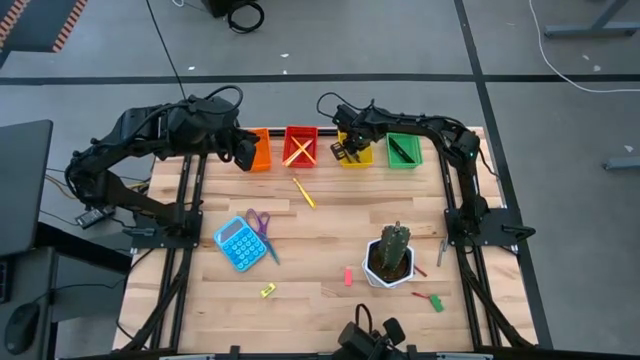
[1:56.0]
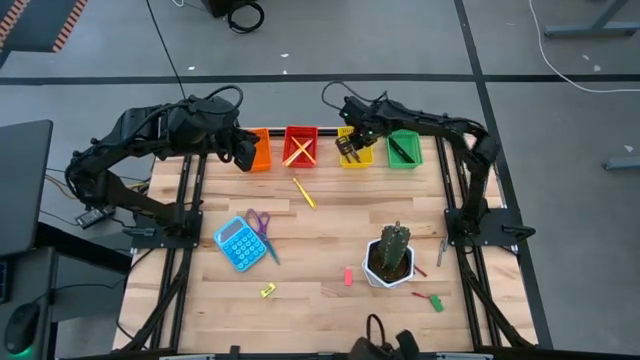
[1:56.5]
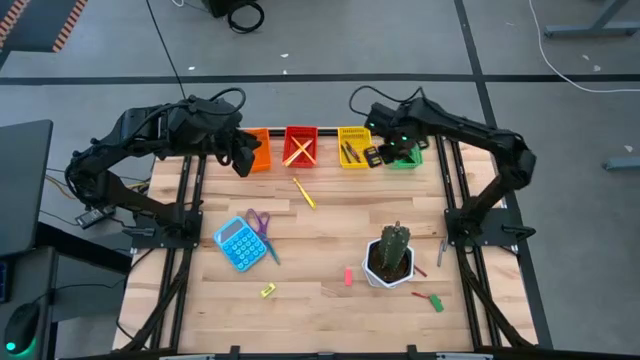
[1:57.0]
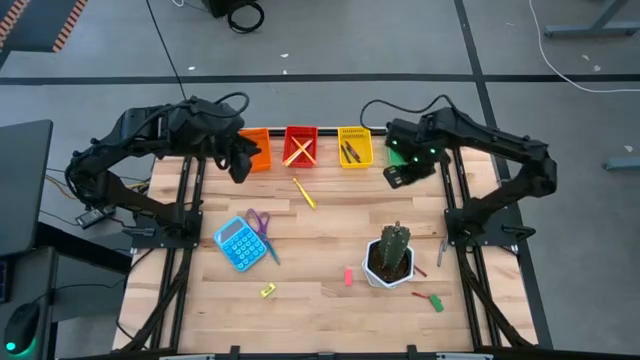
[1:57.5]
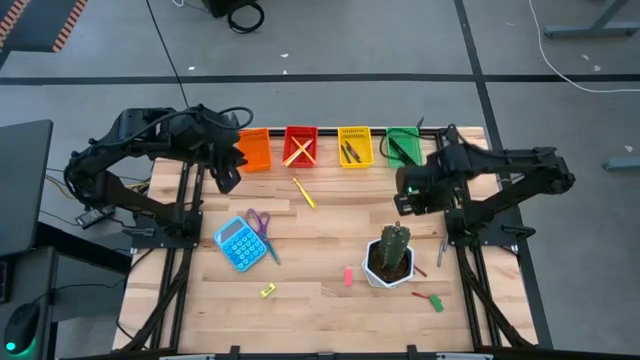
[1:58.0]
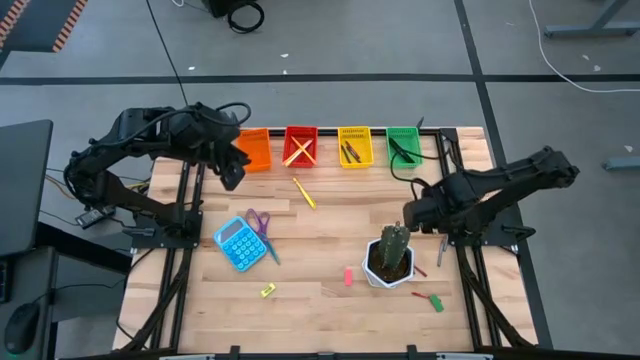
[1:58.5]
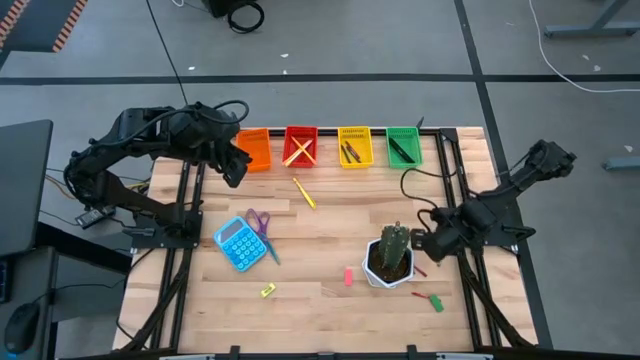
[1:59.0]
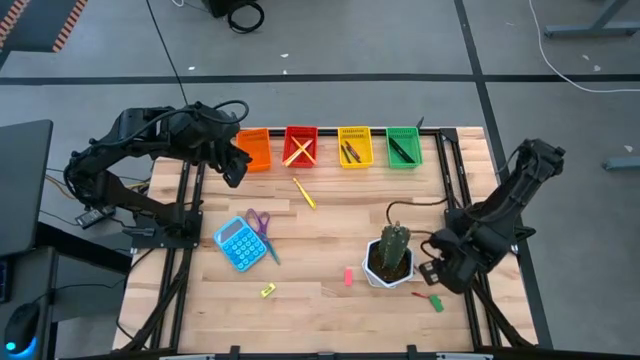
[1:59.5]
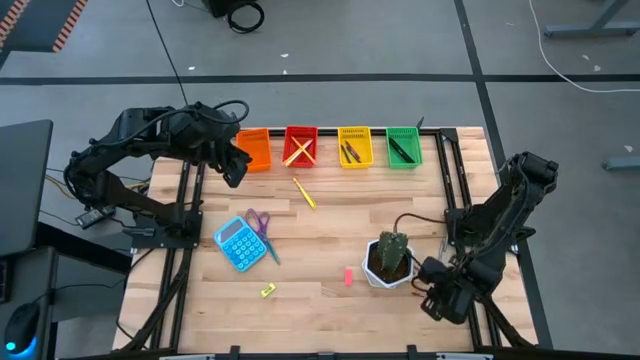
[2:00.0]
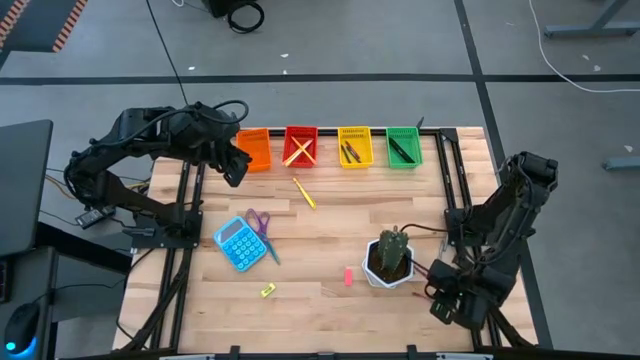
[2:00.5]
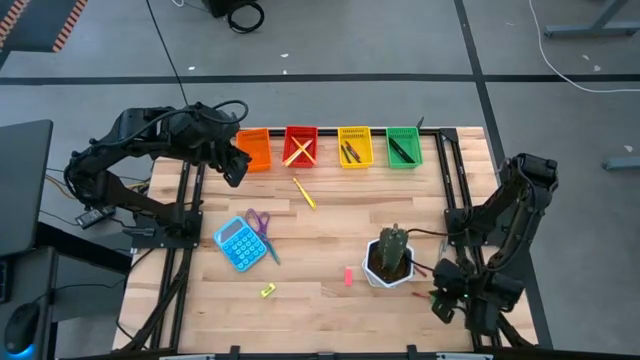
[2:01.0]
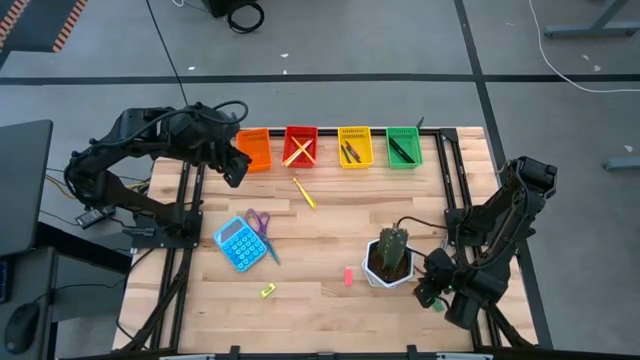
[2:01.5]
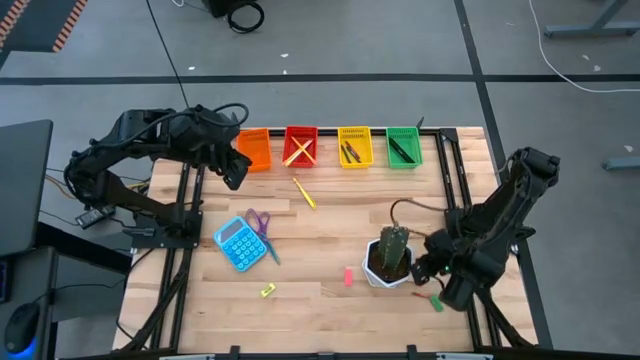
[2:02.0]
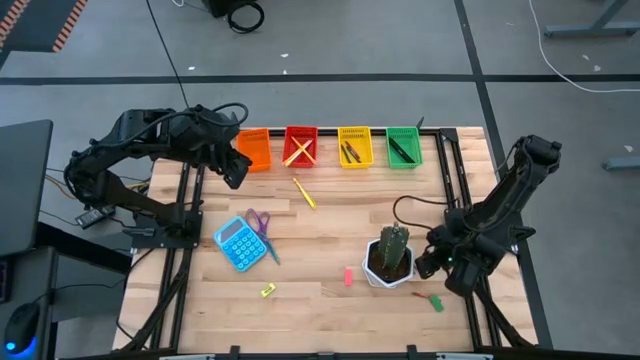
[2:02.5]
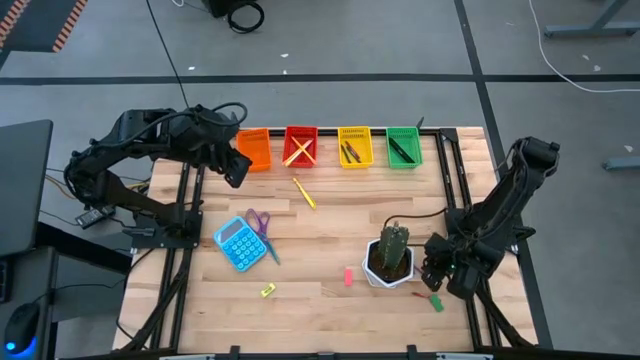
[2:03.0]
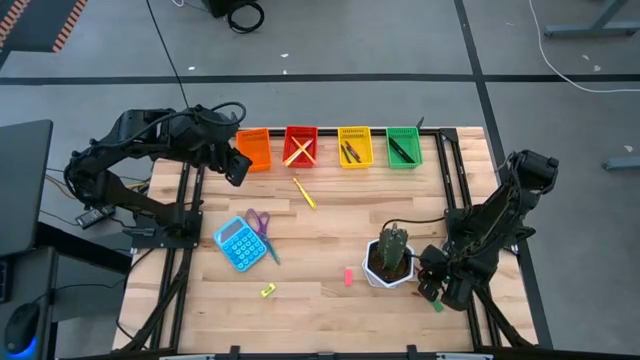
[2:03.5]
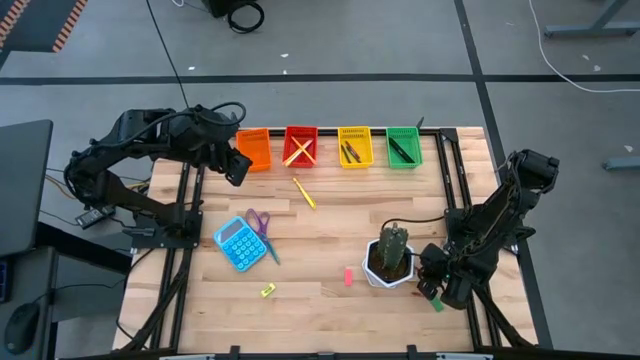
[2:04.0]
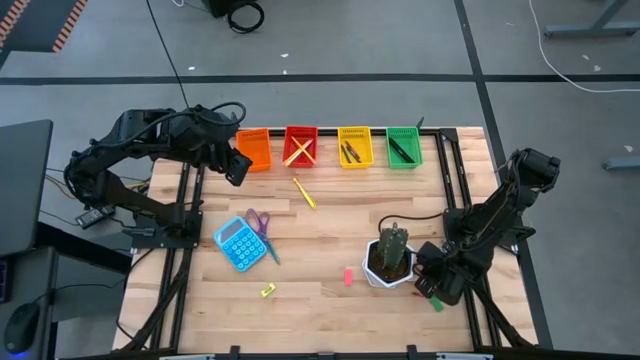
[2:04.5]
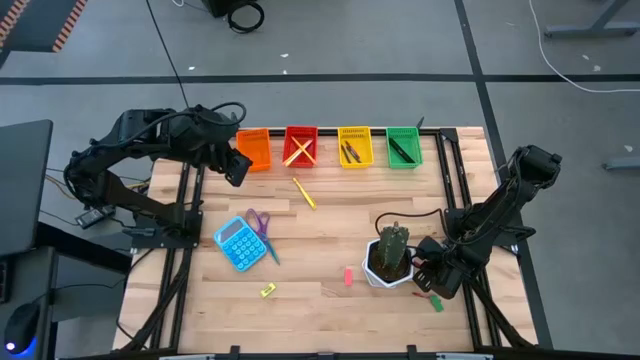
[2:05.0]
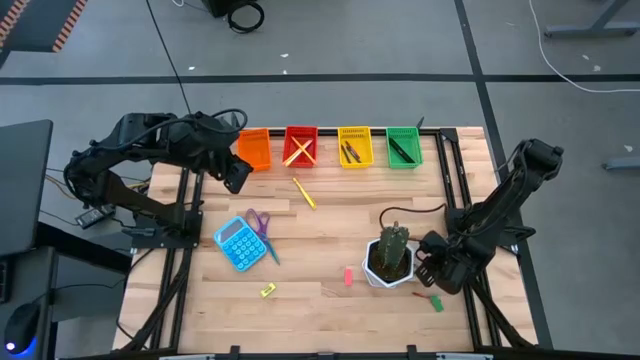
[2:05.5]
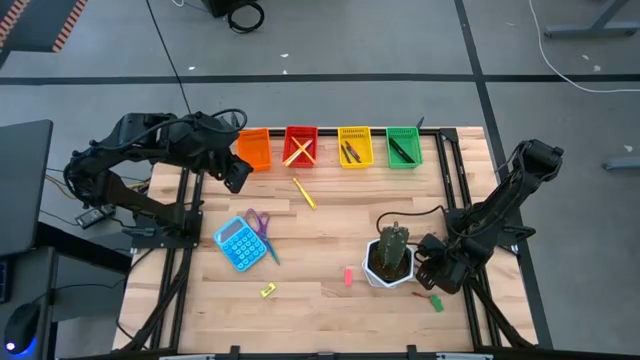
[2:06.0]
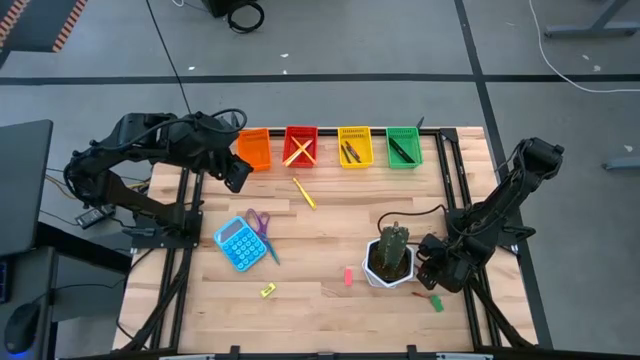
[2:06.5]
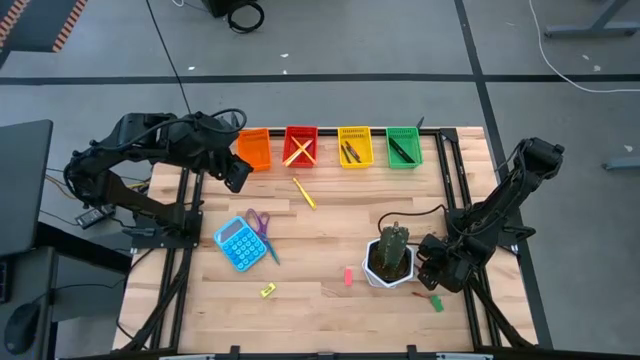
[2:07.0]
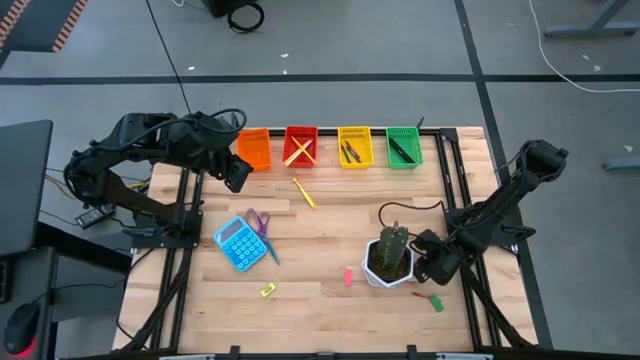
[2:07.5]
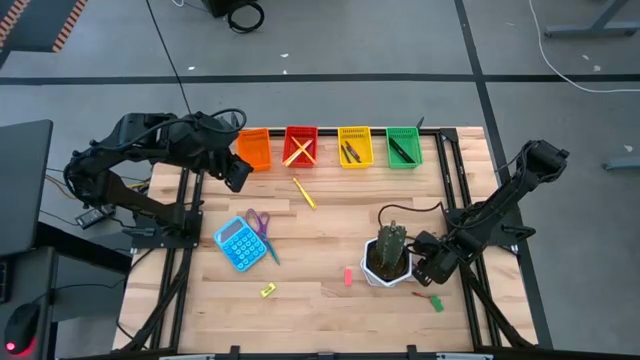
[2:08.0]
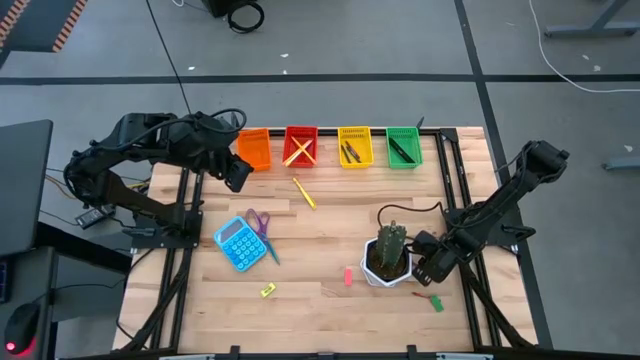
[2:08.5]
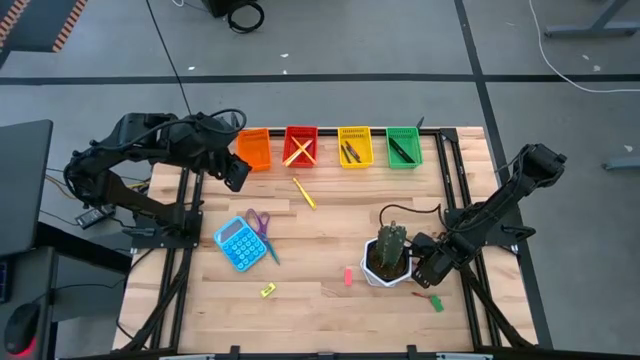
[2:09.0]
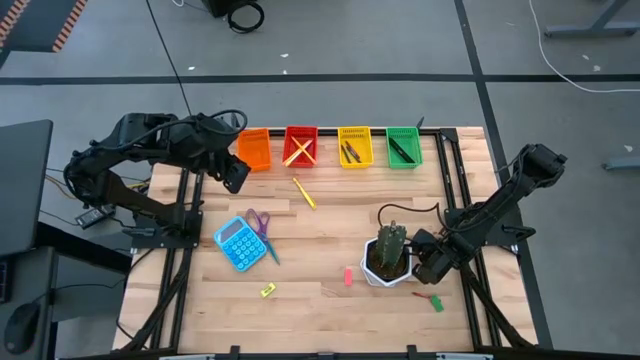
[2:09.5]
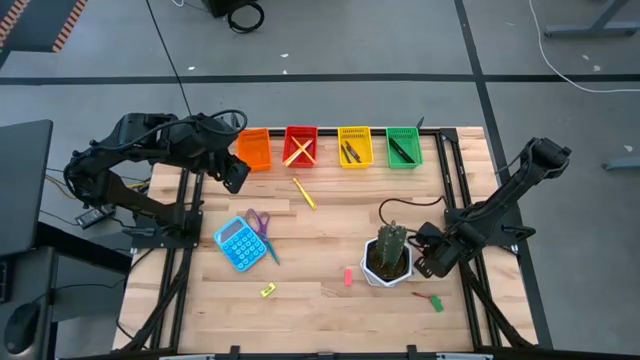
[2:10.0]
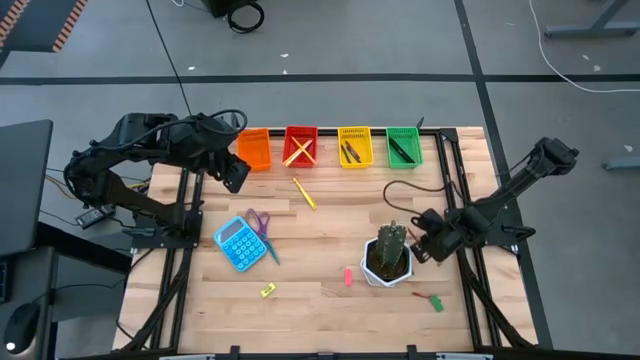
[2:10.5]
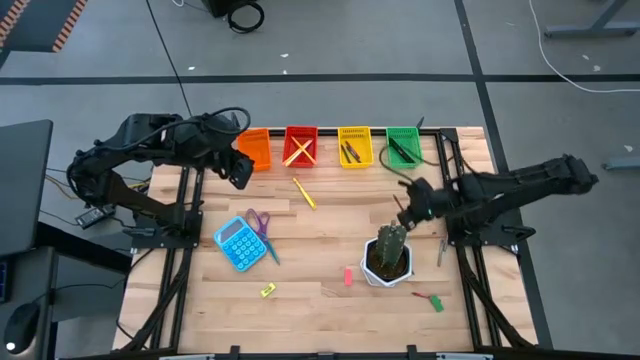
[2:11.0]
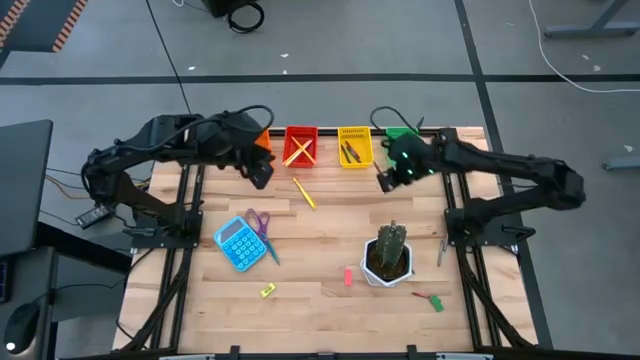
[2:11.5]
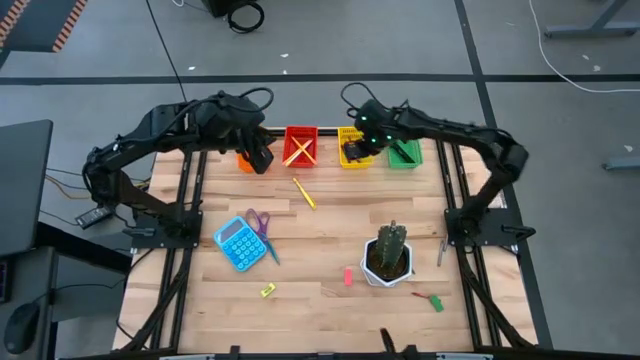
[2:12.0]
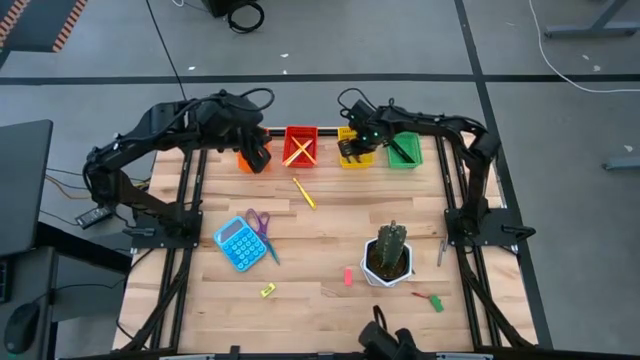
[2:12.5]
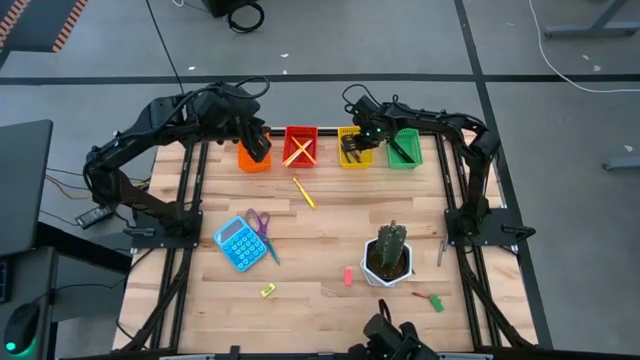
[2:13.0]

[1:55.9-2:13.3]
Task: Sort crayons/erasers/pens/pencils in bins
Put the top red crayon into the yellow bin

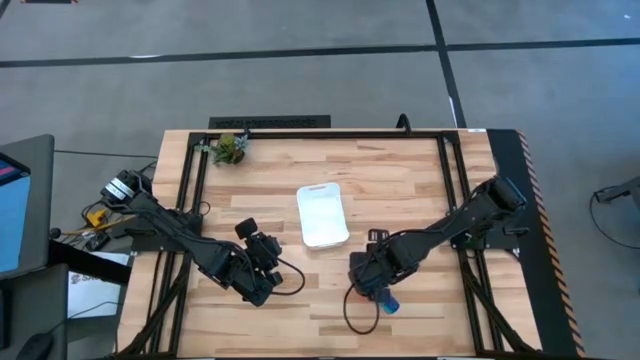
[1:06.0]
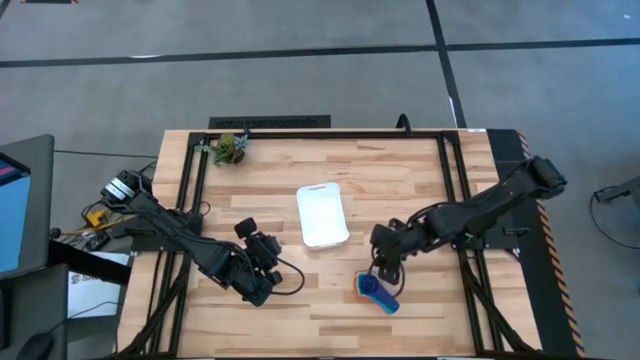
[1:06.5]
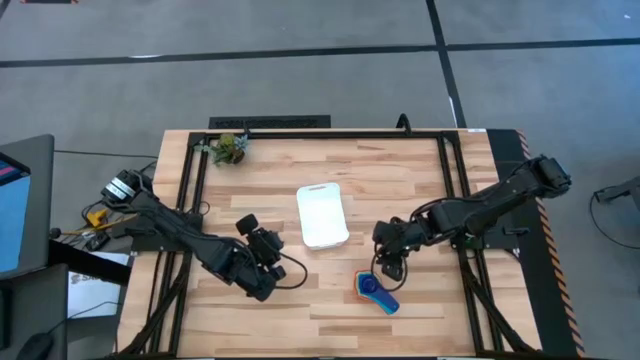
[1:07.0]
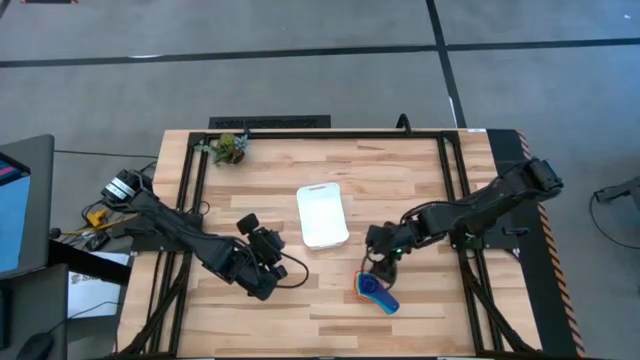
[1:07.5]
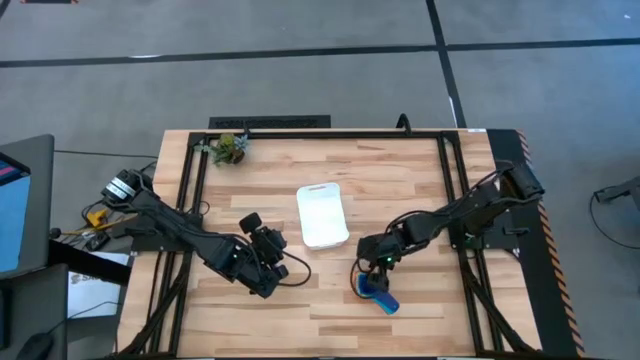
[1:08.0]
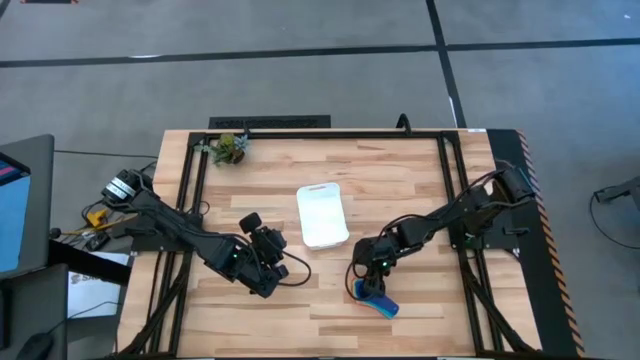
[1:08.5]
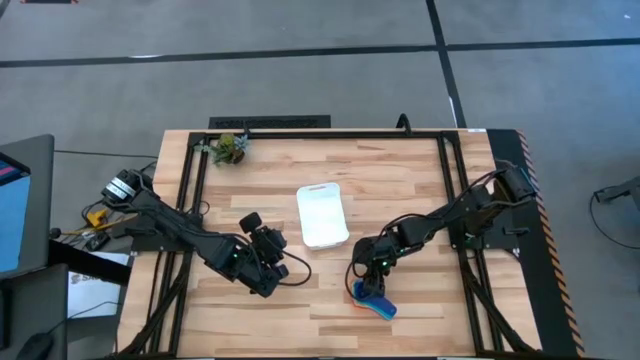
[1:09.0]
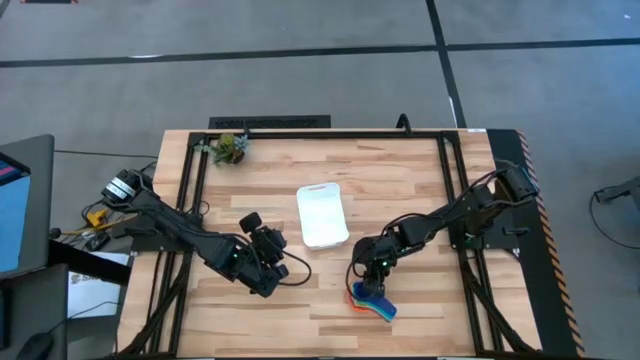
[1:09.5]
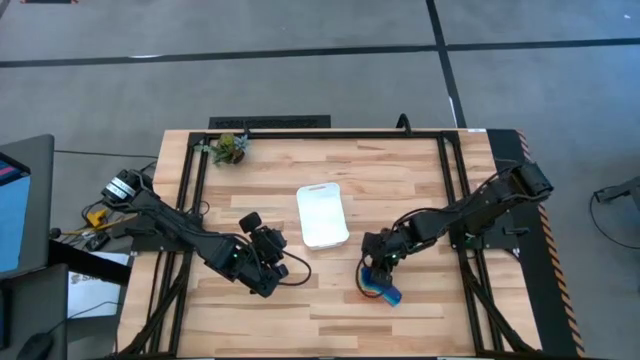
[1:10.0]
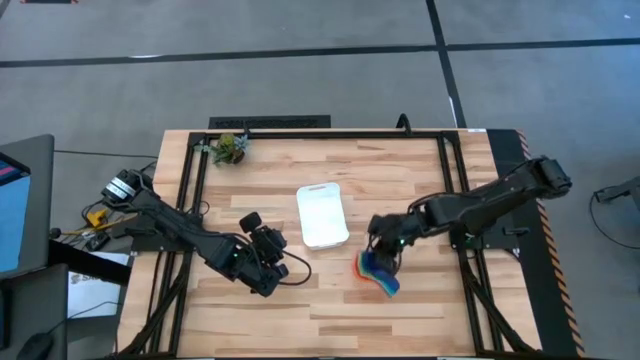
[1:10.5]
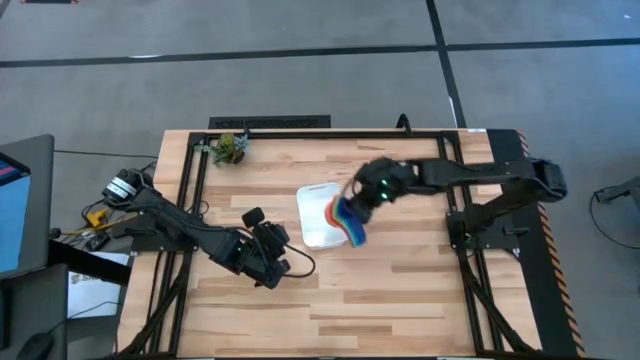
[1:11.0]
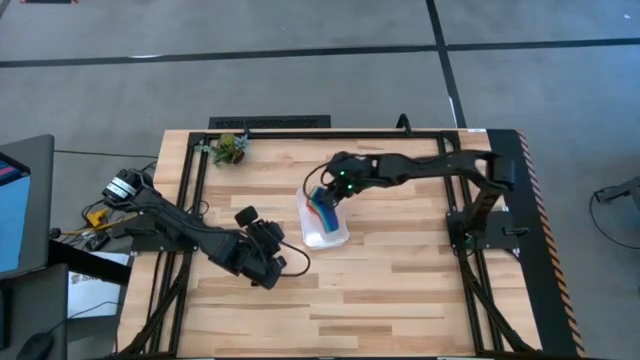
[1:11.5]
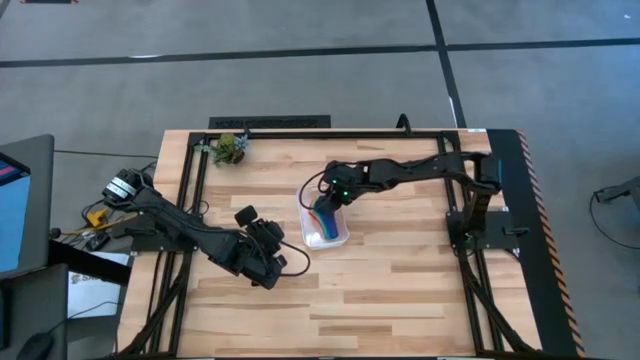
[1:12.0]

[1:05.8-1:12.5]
Task: Nest measuring cups in basket
Put the nested measuring cups into the white bin
